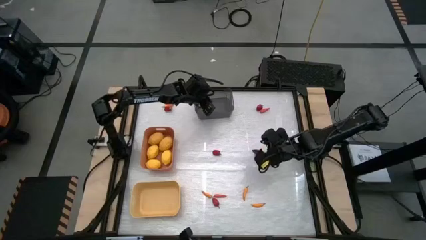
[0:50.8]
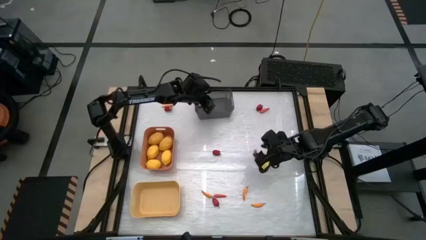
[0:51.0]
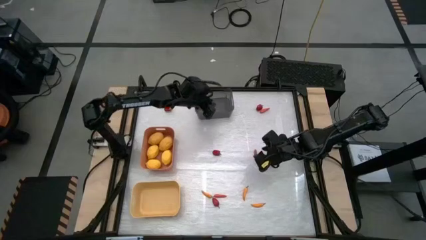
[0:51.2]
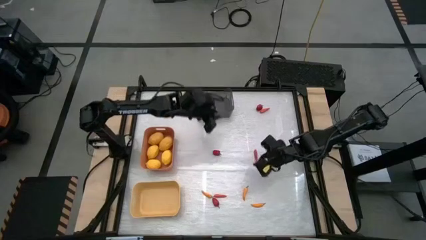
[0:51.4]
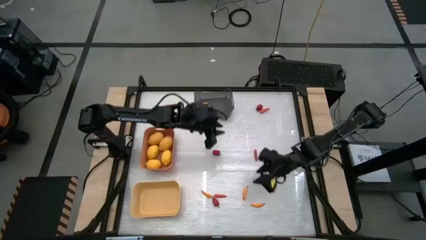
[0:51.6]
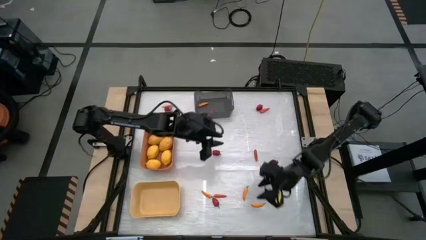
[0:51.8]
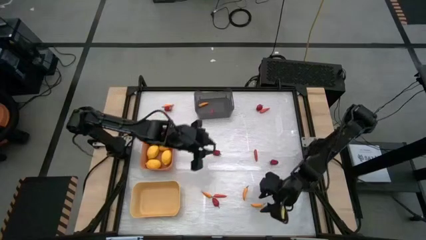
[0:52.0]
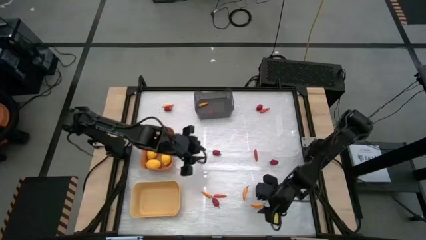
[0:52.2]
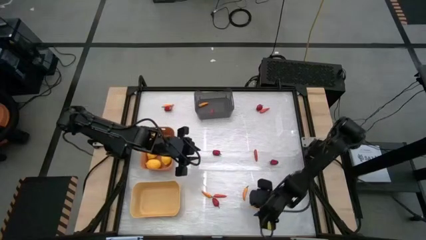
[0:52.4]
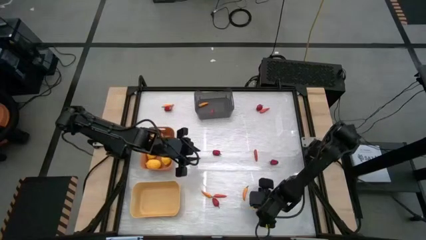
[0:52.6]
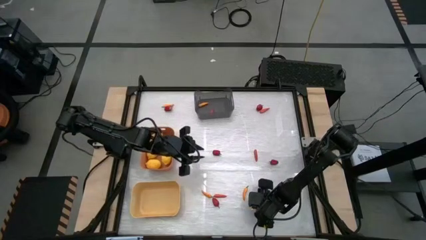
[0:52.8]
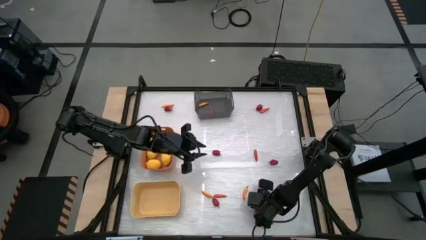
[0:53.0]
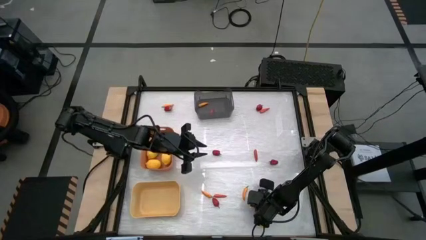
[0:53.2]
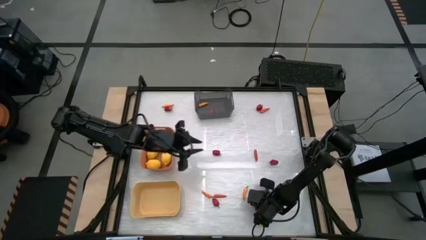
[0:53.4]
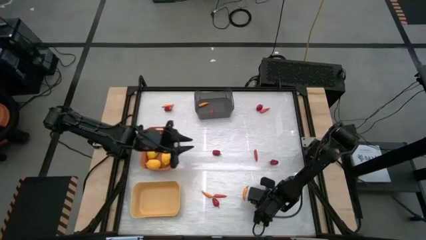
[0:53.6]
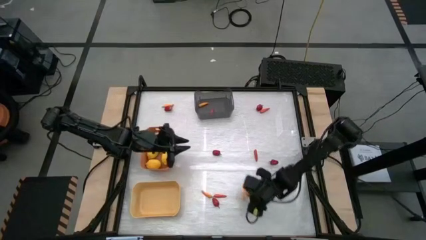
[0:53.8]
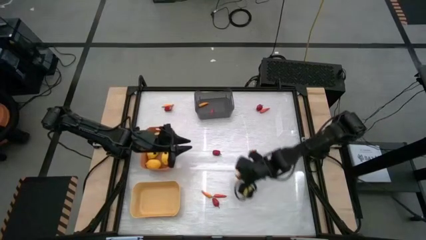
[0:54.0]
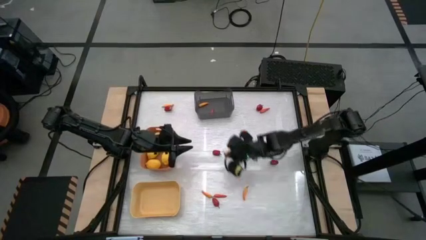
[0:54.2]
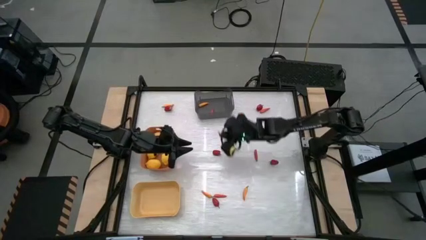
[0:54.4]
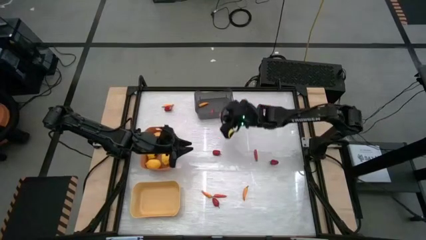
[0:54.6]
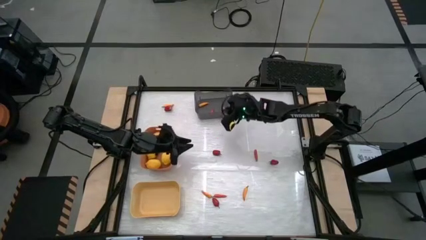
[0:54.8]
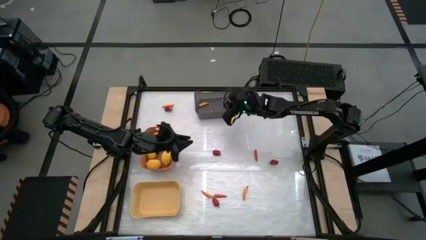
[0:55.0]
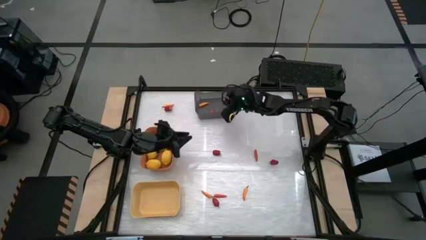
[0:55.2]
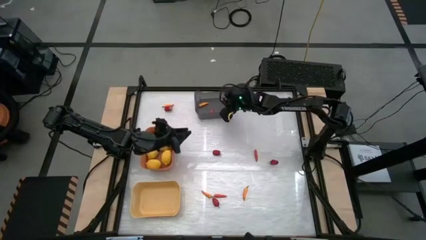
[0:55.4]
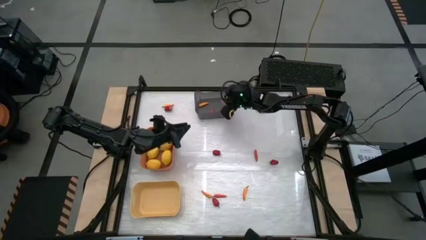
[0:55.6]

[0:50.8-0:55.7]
Task: Sort produce into baskets
Put the orange chili pepper into the black bin

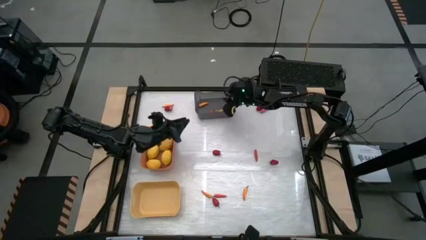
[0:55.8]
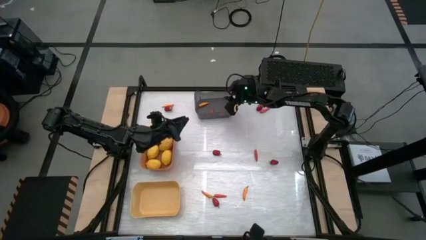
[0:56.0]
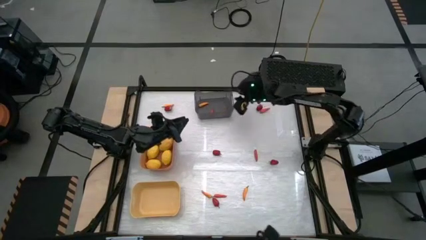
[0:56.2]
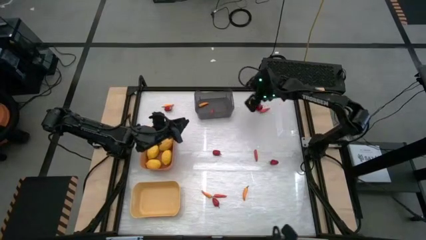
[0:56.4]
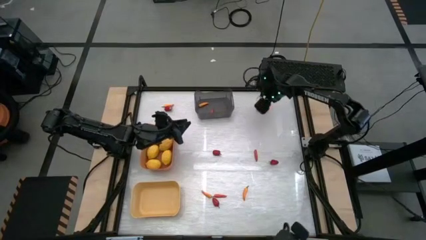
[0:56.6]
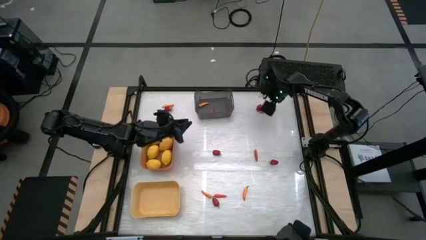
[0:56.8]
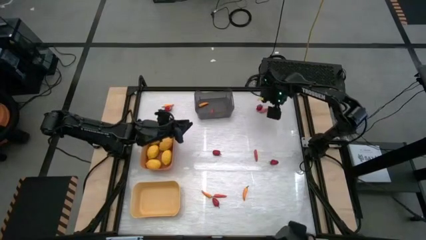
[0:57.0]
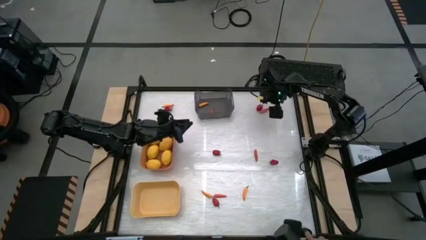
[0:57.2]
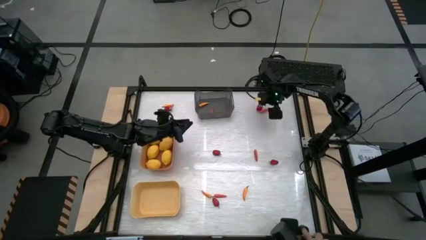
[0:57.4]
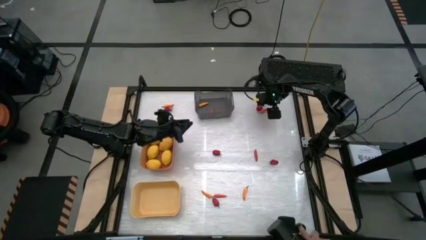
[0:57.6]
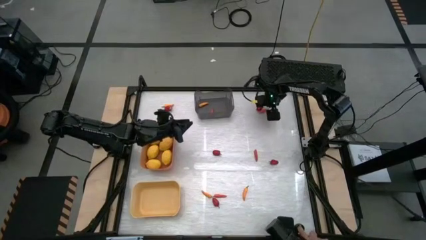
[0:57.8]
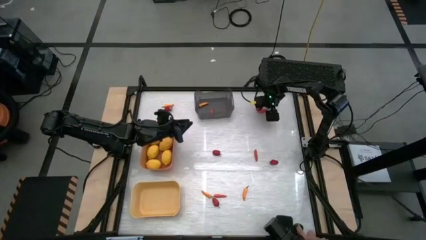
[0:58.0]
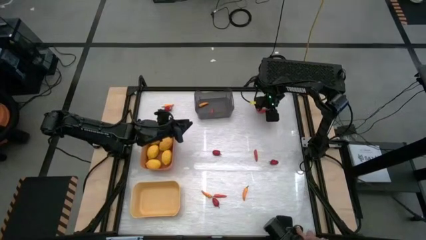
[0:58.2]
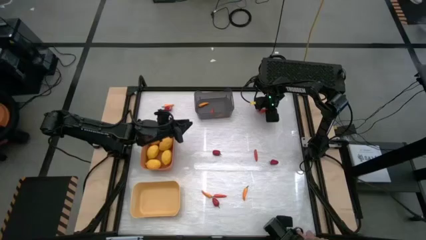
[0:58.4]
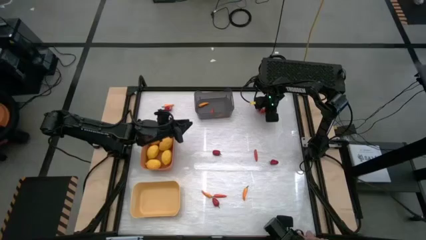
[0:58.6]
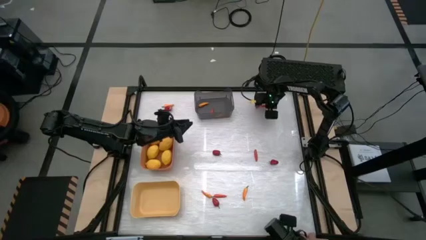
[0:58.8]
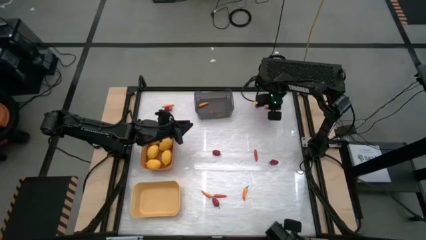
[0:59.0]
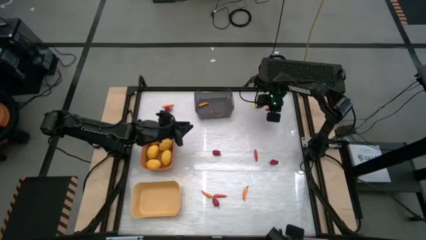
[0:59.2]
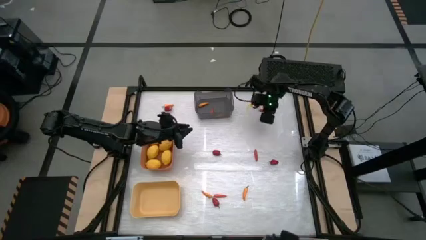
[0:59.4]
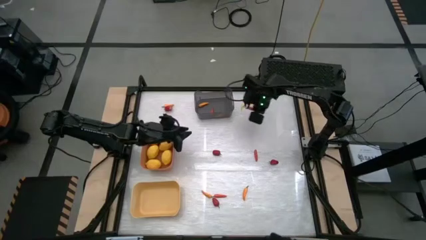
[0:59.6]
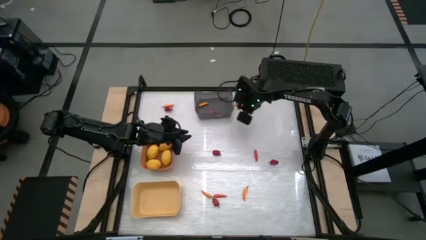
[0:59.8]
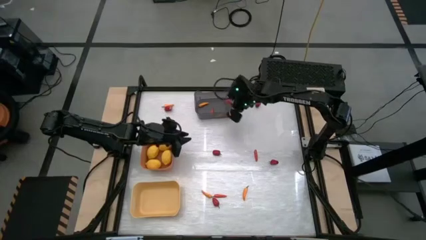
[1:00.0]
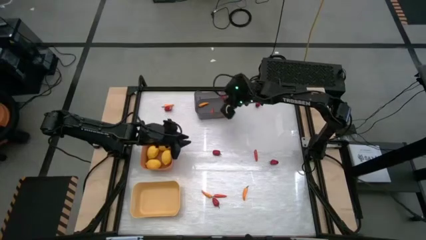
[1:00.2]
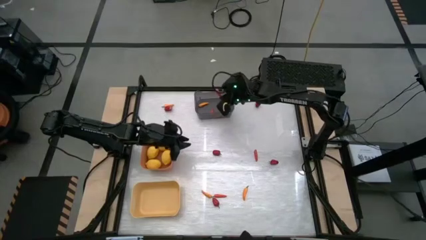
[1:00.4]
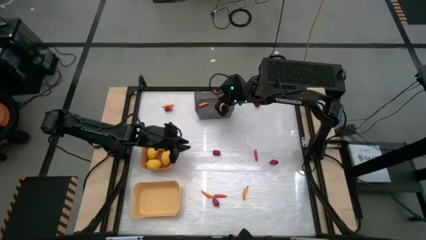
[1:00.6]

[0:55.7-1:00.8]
Put the red bell pepper into the black bin

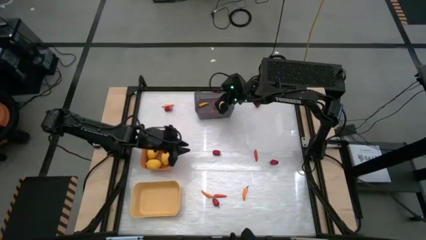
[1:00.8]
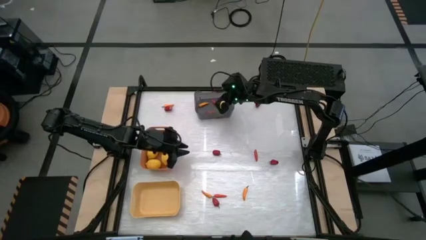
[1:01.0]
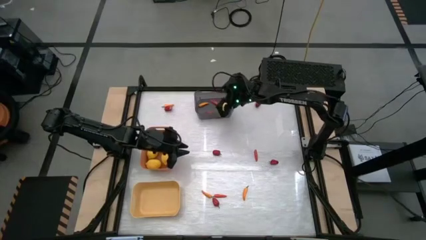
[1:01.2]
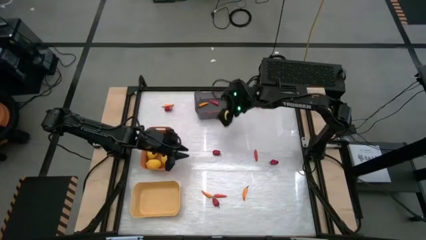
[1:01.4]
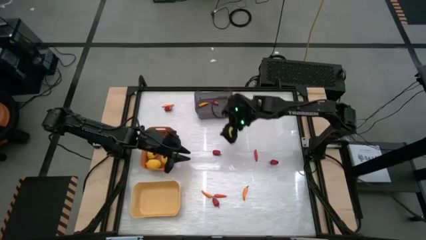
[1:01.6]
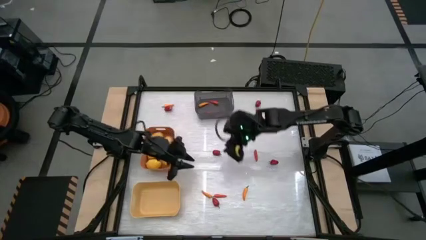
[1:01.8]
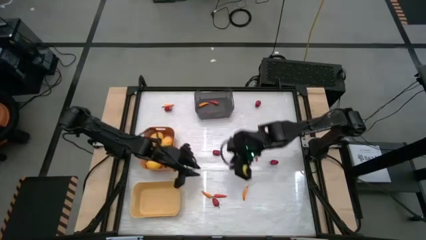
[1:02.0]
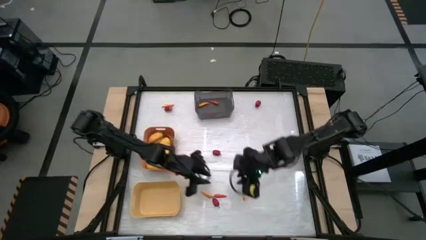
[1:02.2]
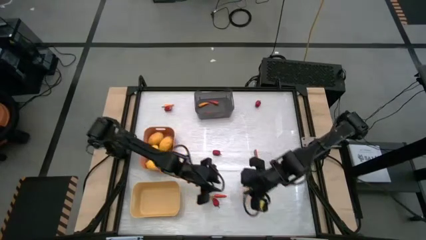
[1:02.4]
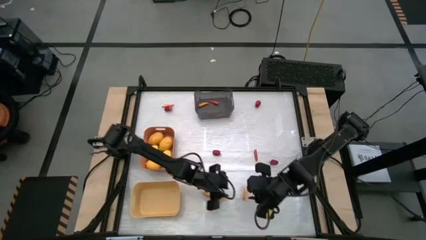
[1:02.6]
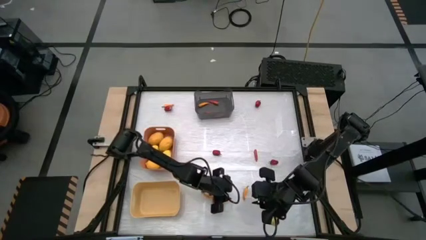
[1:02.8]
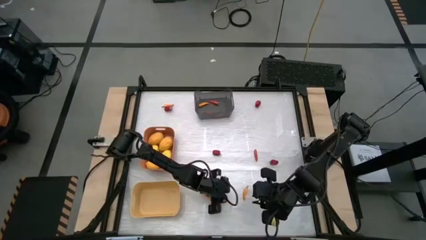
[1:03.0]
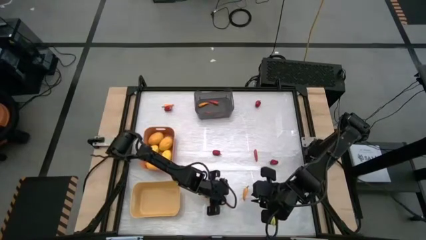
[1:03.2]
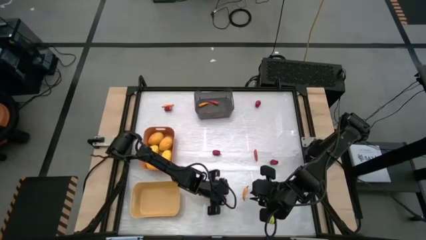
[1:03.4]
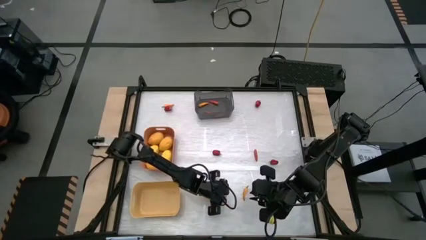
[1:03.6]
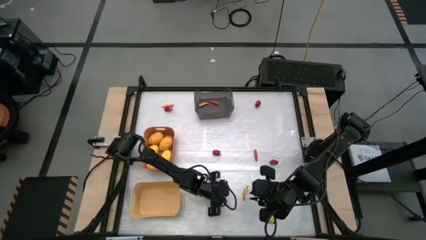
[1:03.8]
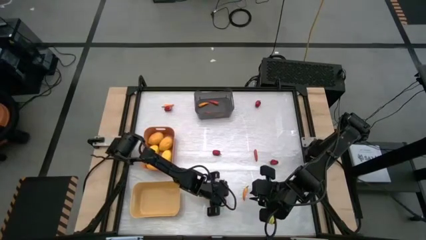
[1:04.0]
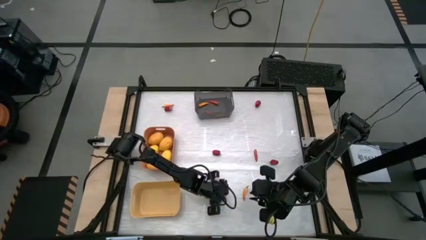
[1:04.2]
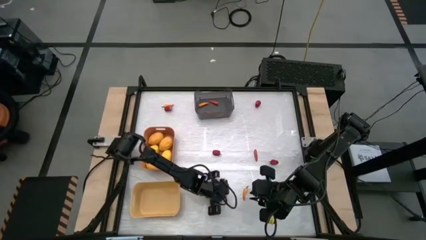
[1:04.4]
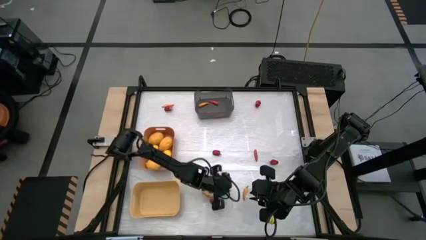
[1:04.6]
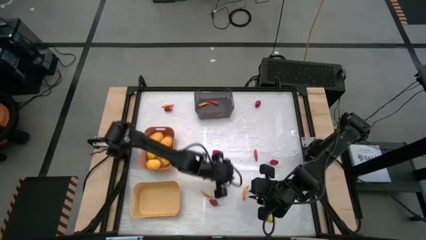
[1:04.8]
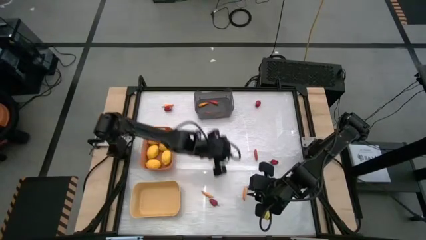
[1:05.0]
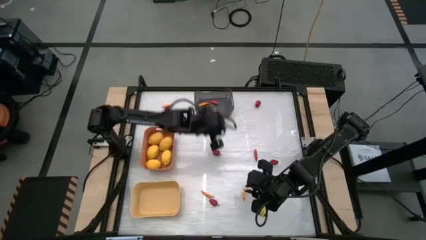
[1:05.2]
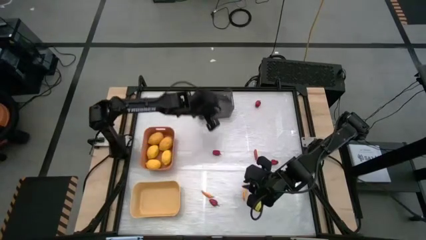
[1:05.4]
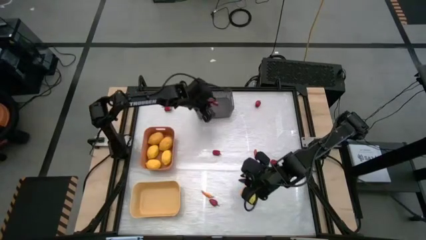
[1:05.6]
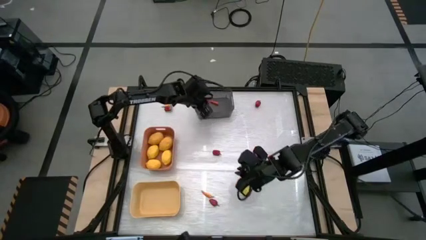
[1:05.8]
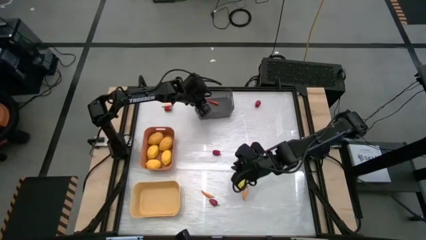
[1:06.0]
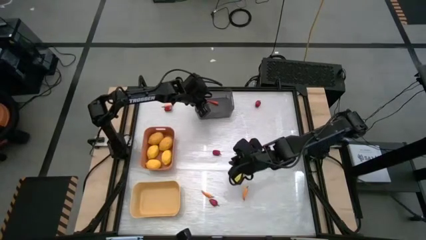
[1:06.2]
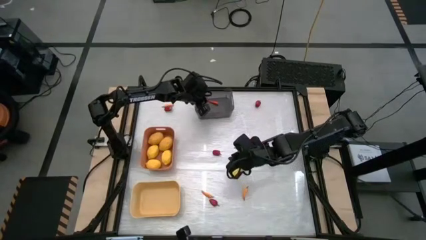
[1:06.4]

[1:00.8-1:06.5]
Put the red bell pepper into the black bin

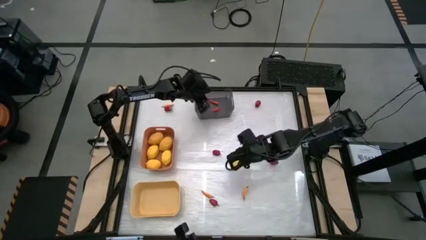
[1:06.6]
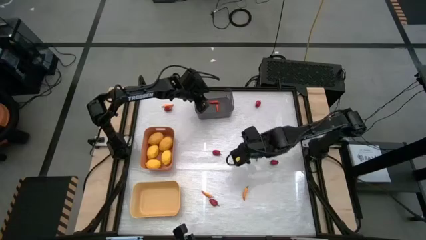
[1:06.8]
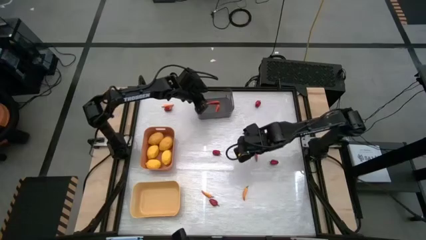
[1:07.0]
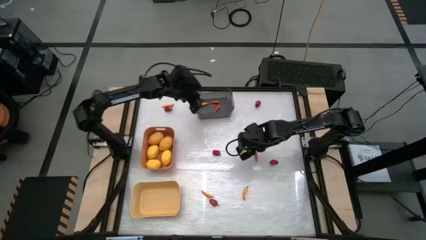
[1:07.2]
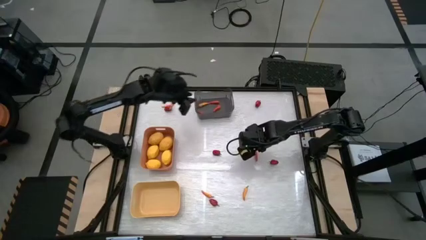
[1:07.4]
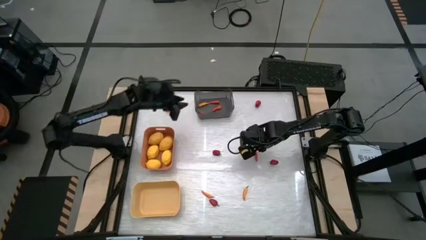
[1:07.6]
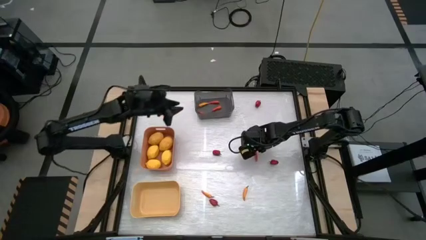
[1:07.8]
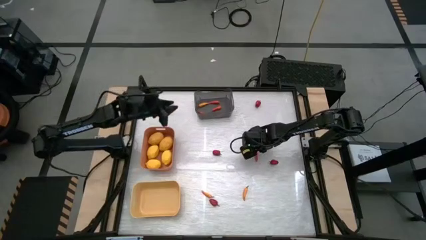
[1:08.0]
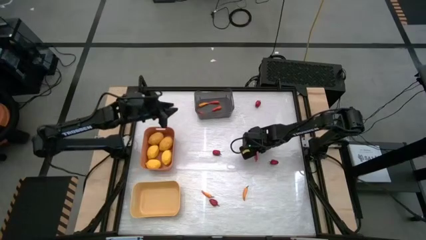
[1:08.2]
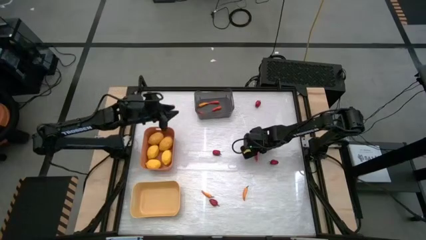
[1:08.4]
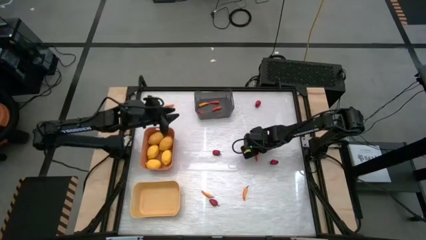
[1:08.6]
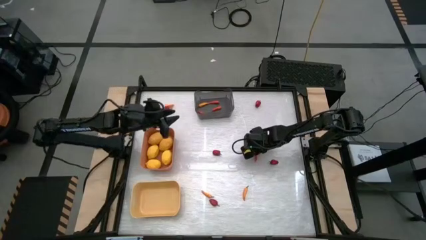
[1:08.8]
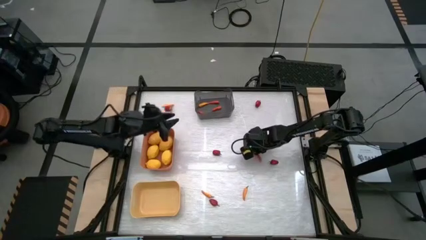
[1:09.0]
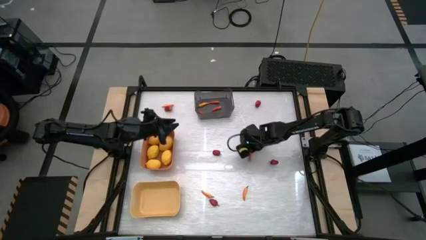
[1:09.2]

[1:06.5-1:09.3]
Put the red bell pepper into the black bin
